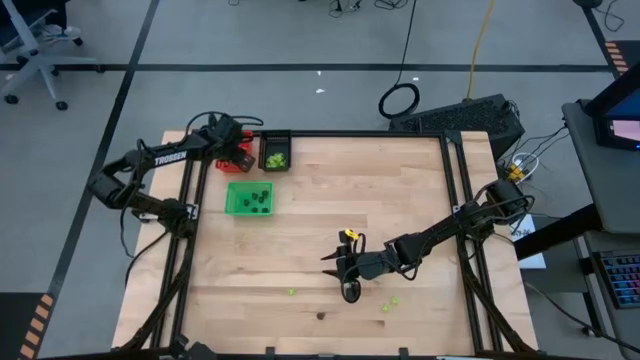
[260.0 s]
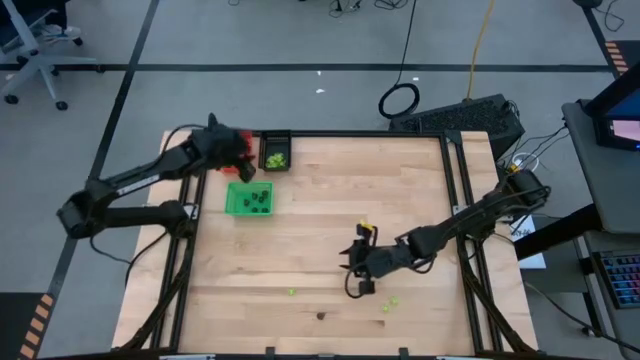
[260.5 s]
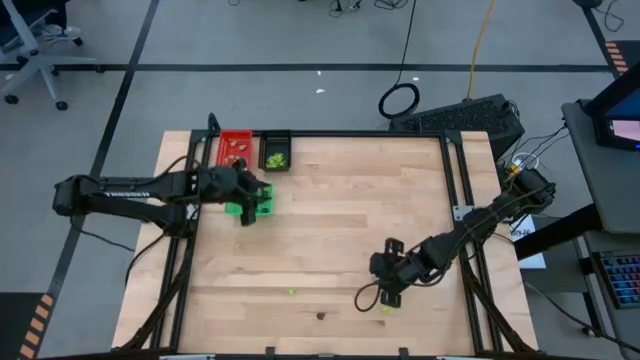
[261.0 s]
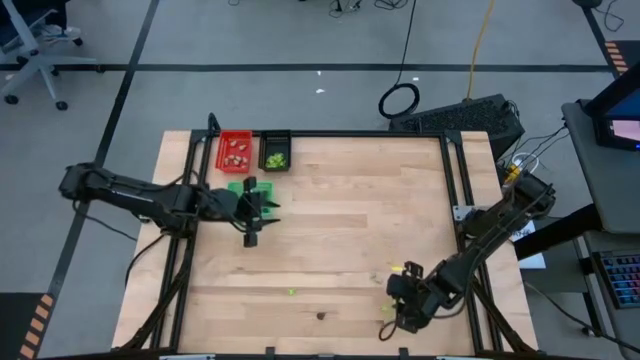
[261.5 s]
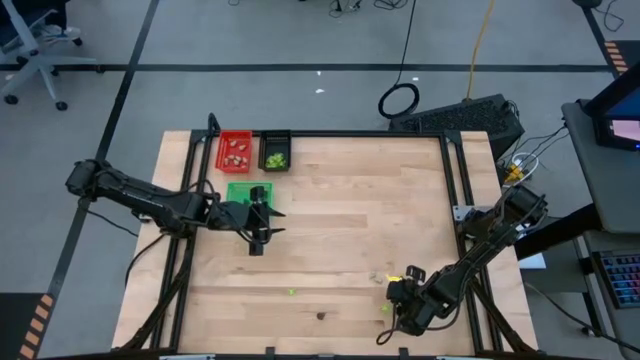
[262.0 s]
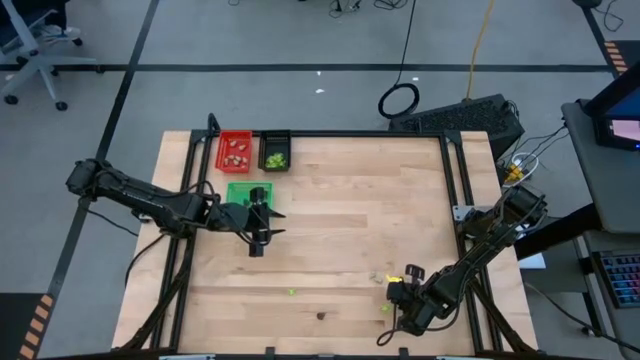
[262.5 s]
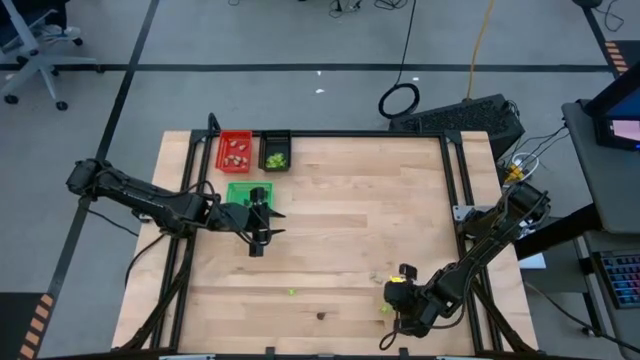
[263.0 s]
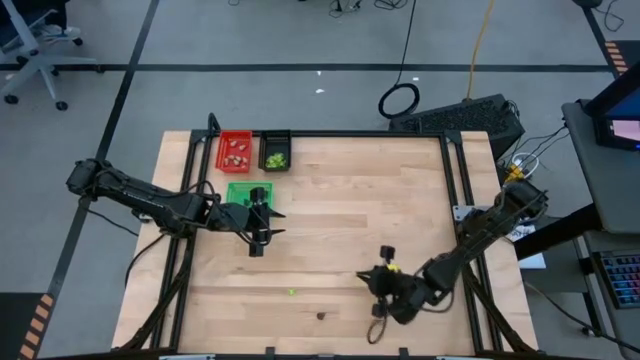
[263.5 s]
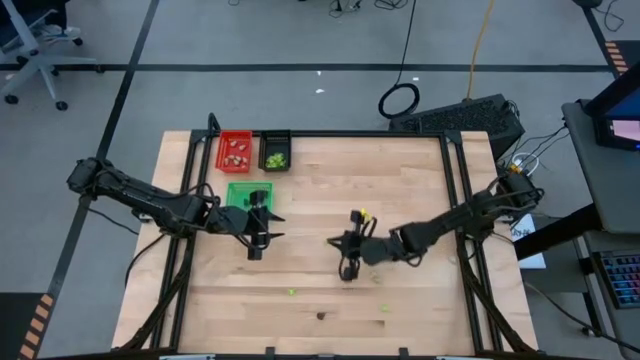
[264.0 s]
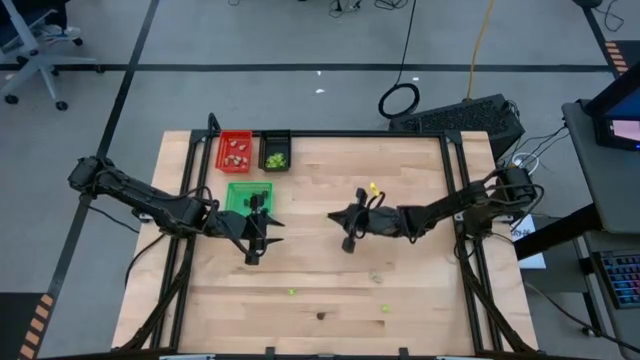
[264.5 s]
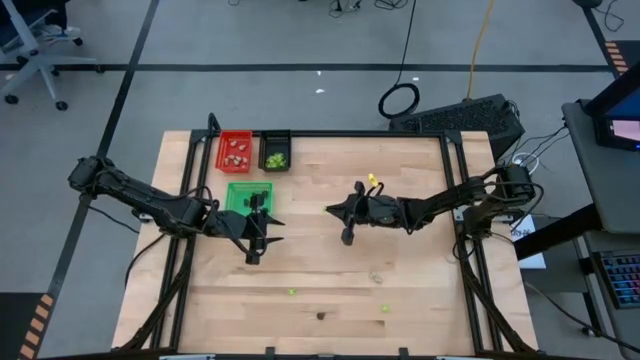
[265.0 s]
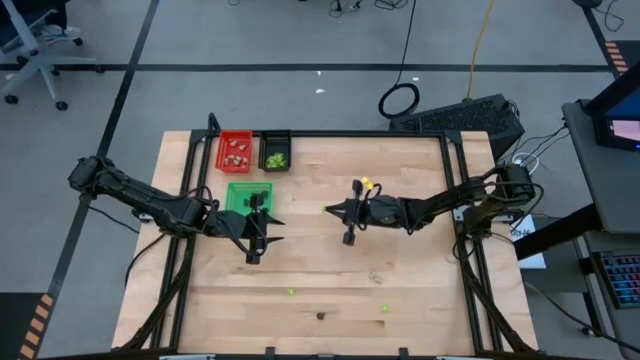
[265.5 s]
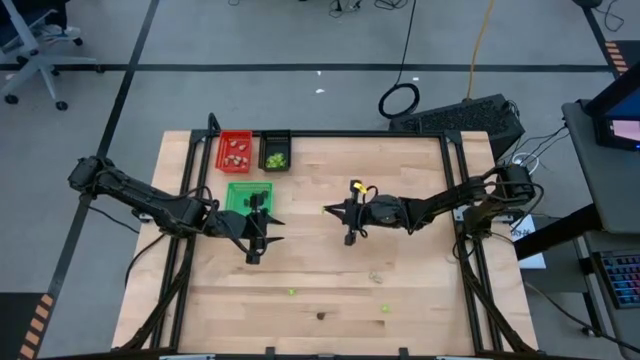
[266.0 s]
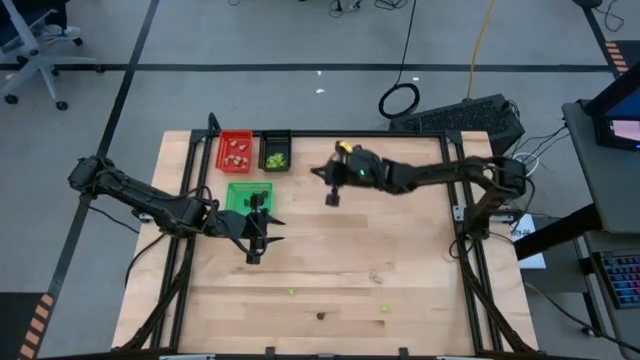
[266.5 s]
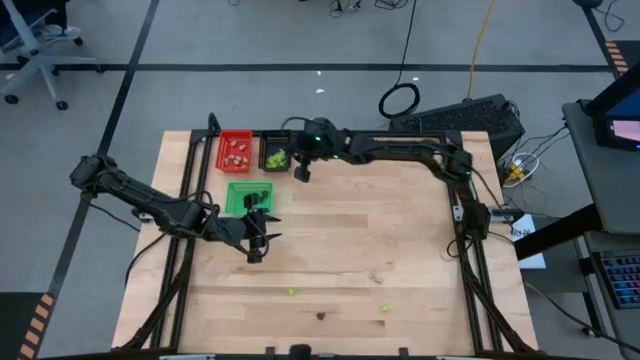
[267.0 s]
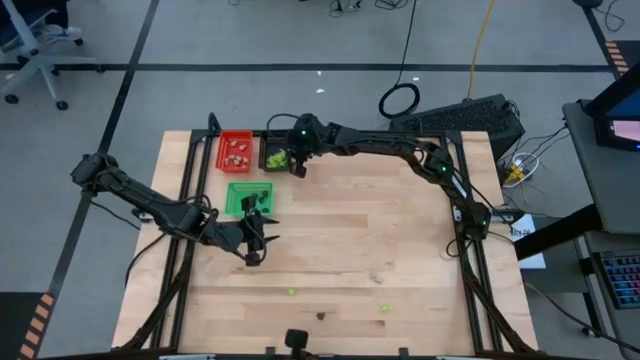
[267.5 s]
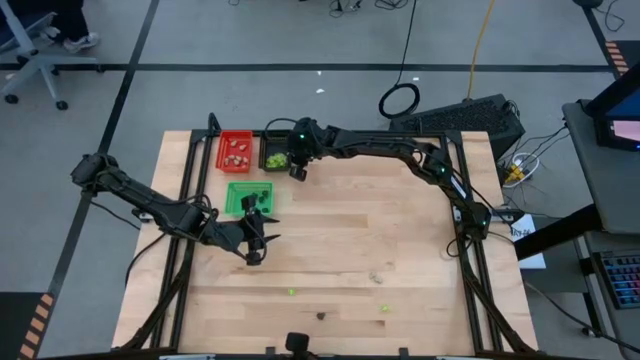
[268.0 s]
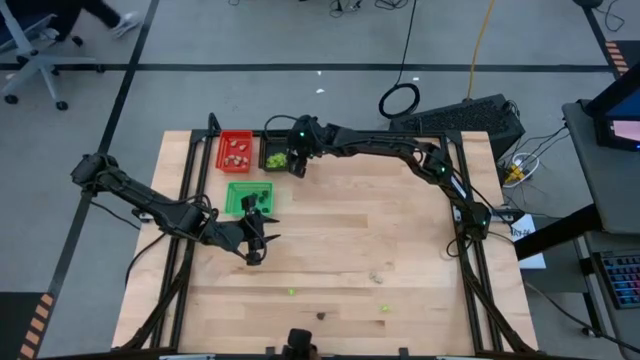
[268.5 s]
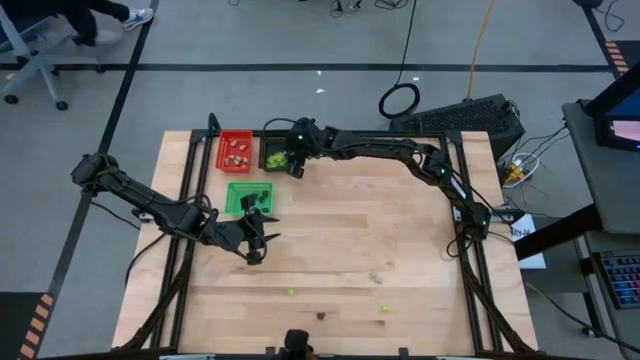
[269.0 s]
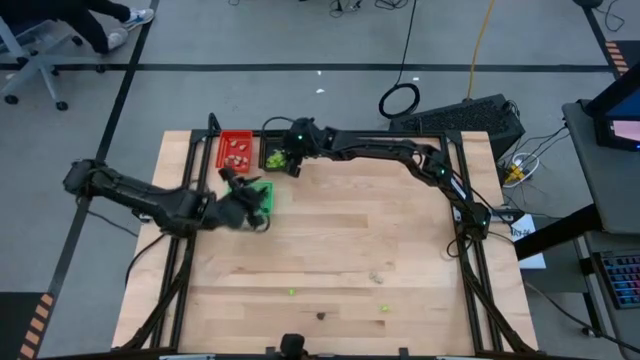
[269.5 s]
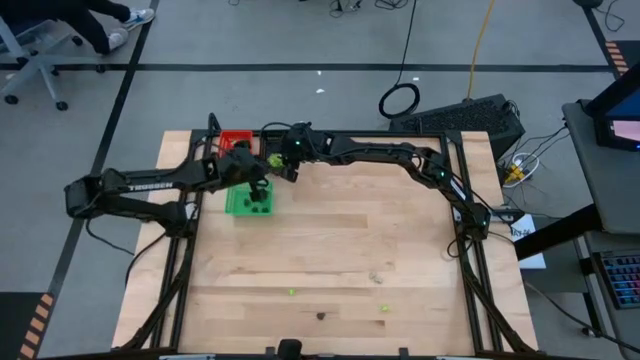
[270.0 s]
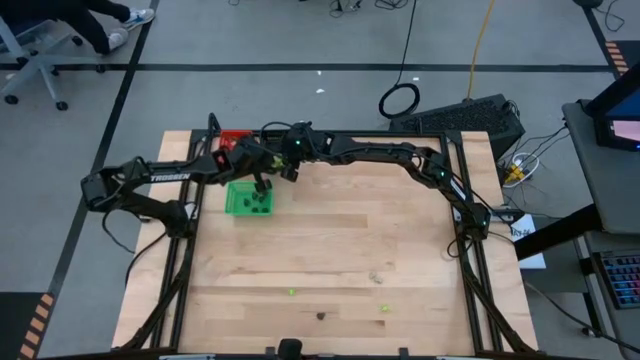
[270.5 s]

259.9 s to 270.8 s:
Task: Sort Halloween decoration
Put the green spider toy into the black bin

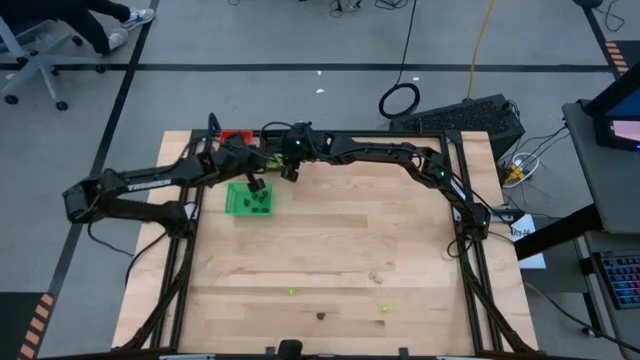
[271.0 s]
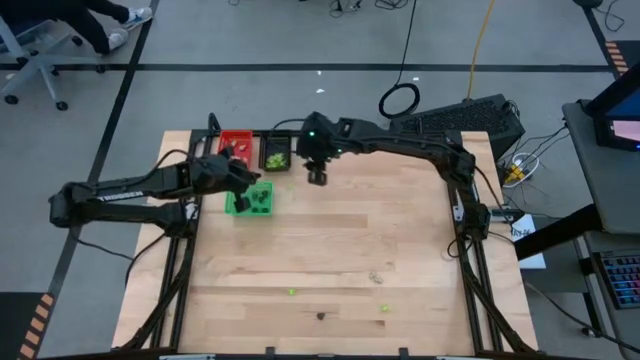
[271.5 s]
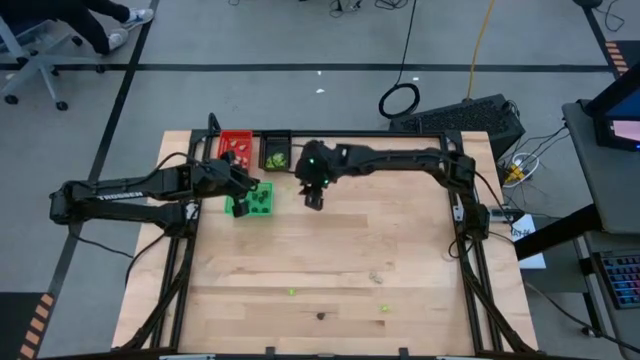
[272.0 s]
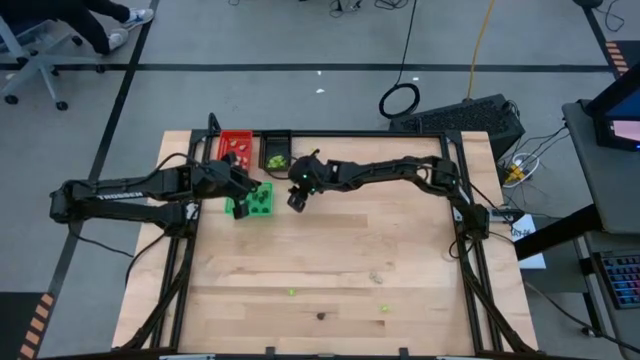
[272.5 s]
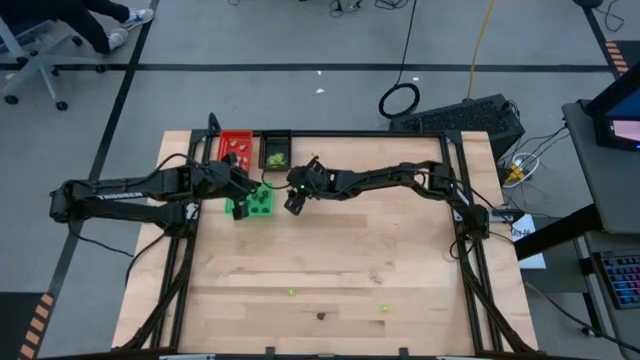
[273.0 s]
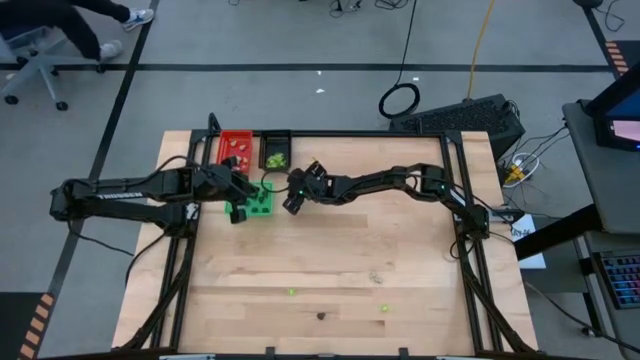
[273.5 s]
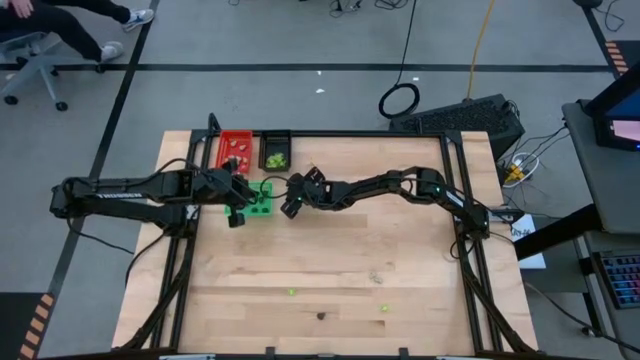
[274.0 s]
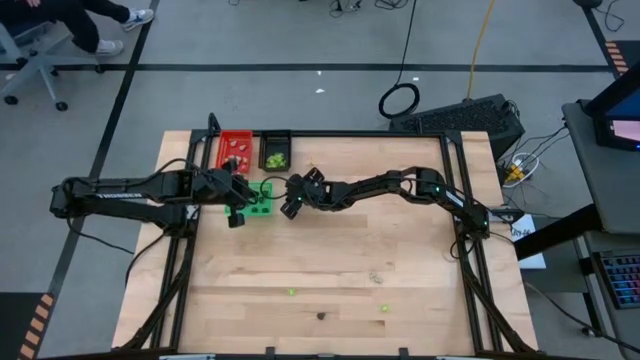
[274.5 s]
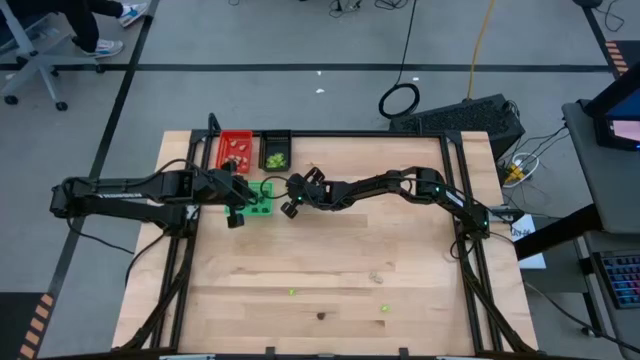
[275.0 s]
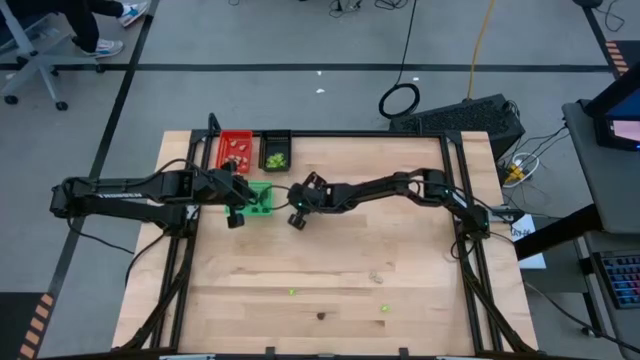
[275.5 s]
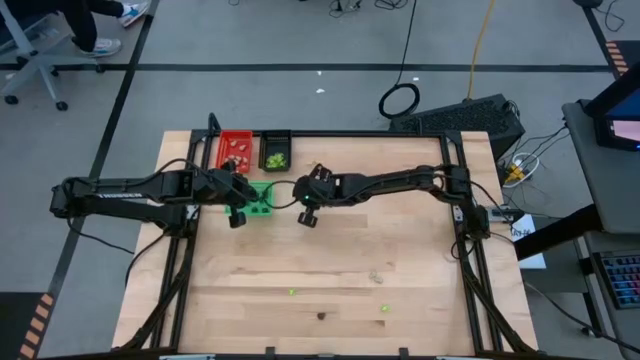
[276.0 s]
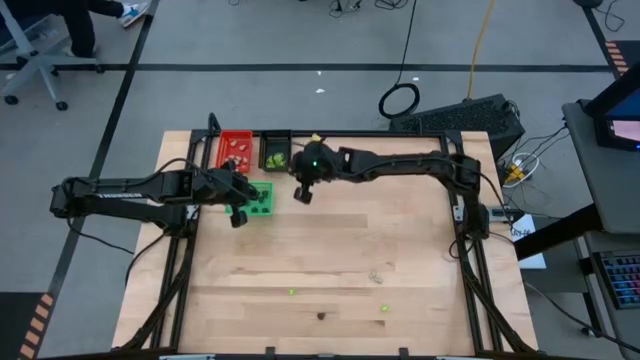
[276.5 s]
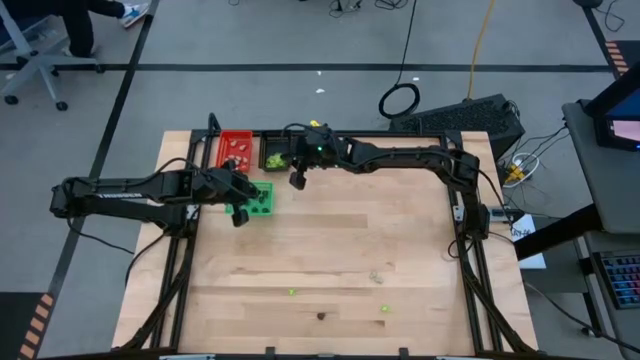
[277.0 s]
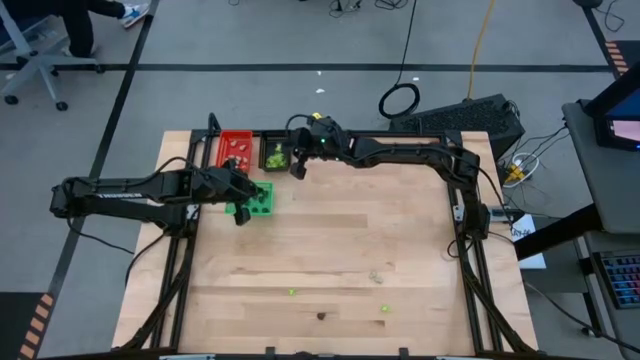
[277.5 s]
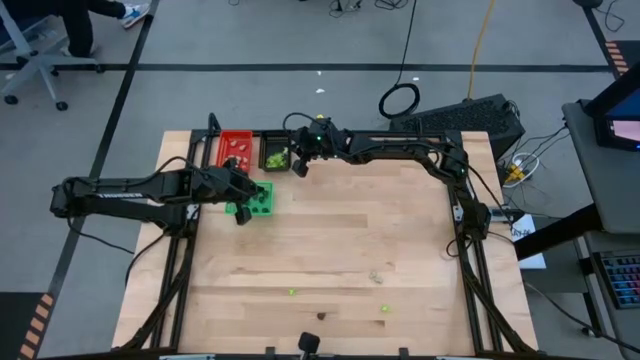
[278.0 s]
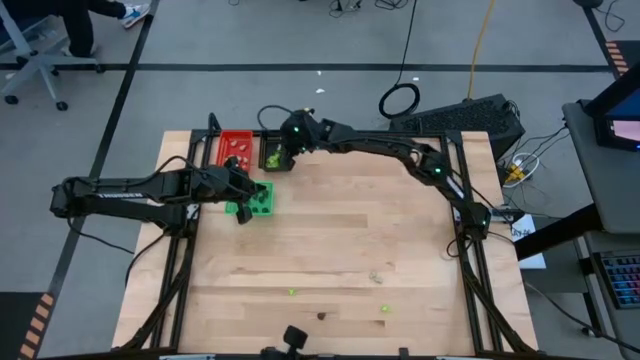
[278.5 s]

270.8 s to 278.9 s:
Put the green spider toy into the black bin

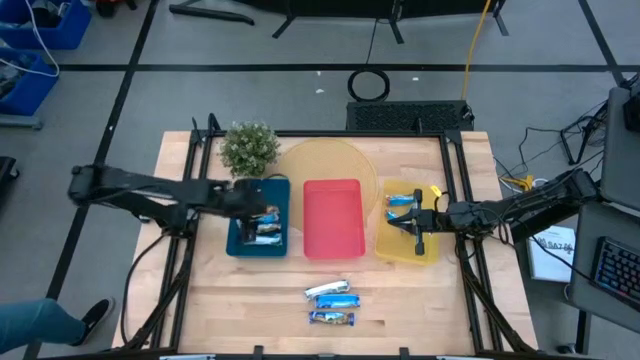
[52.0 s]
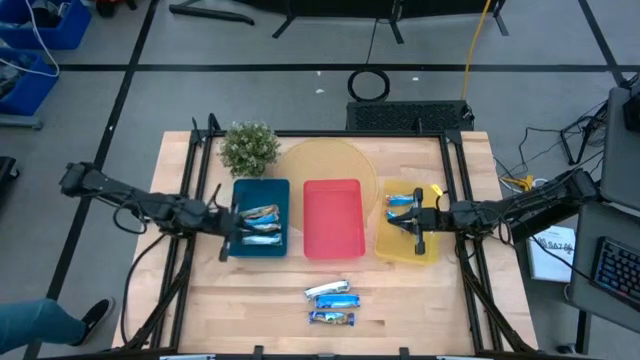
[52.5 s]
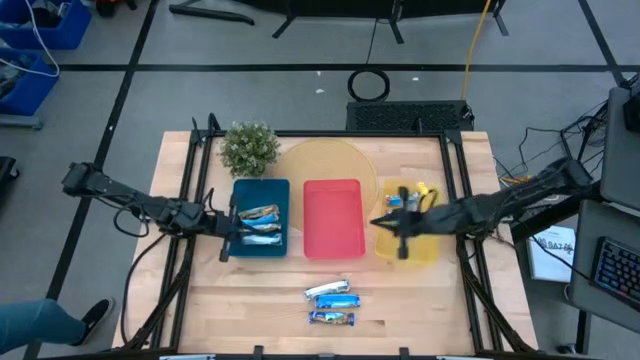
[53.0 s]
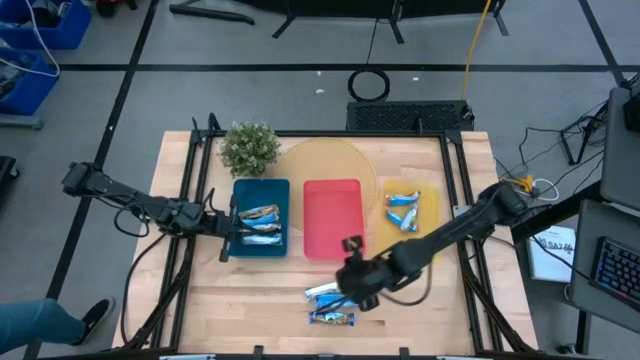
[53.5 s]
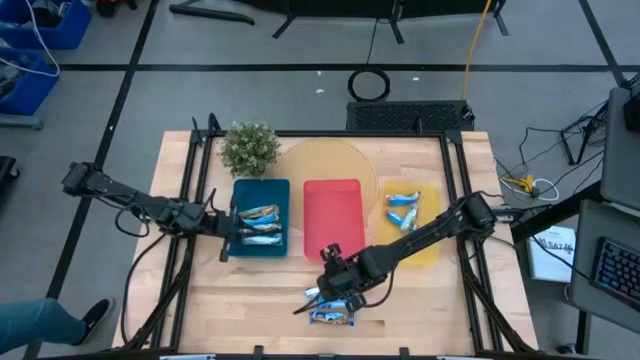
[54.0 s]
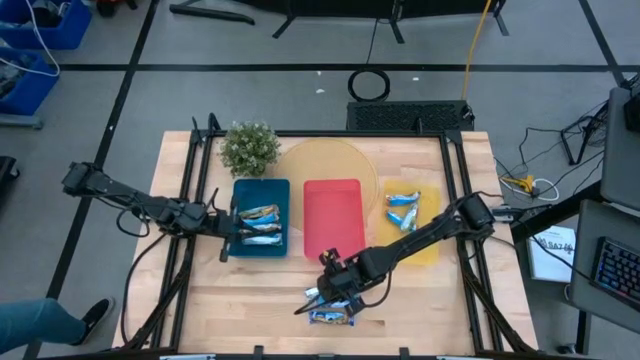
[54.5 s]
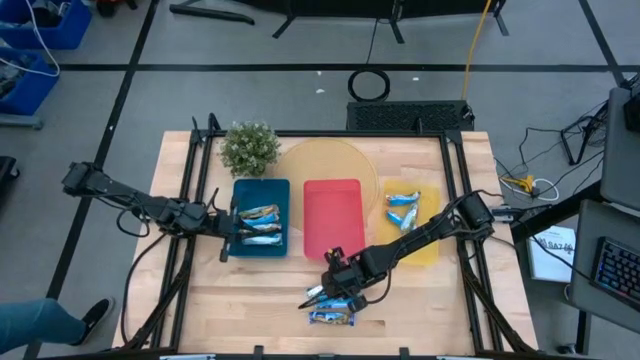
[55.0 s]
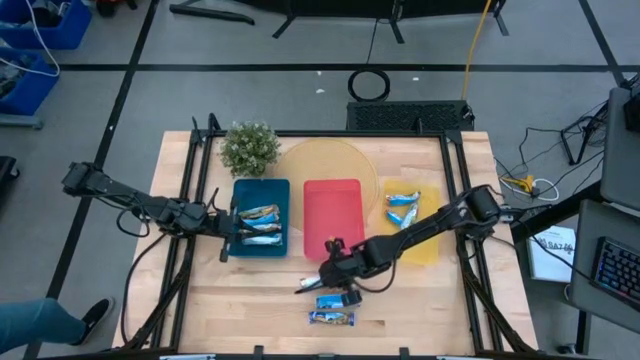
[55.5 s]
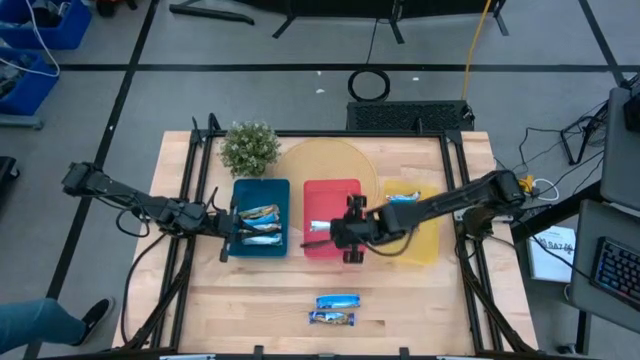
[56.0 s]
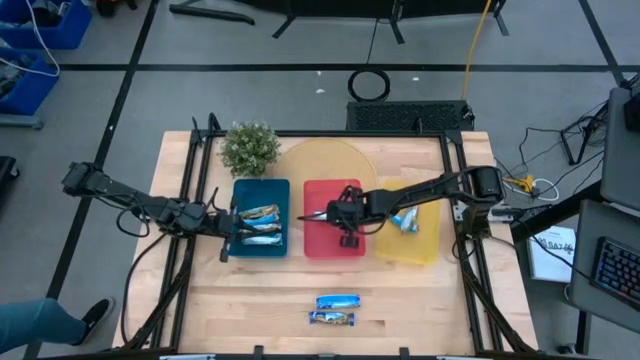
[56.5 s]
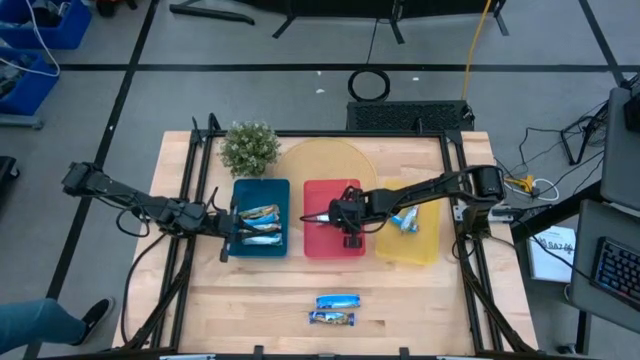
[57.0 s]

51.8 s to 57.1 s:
Task: Pick and place Granola Bars by type
Put the blue granola bar into the red bin
